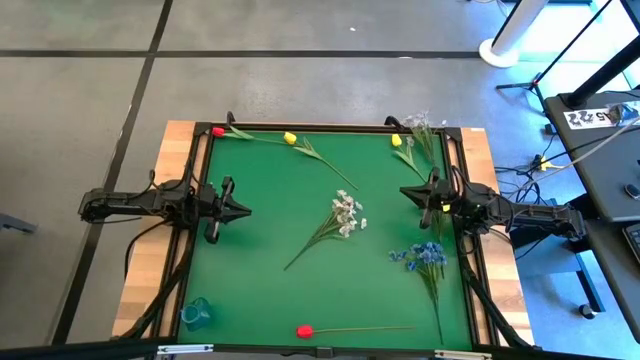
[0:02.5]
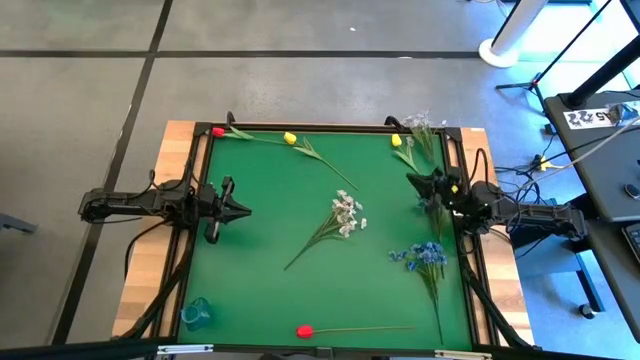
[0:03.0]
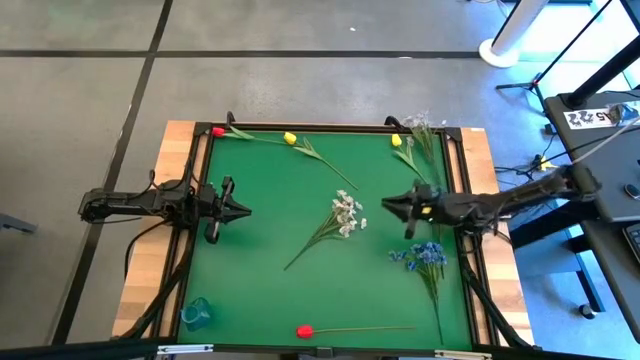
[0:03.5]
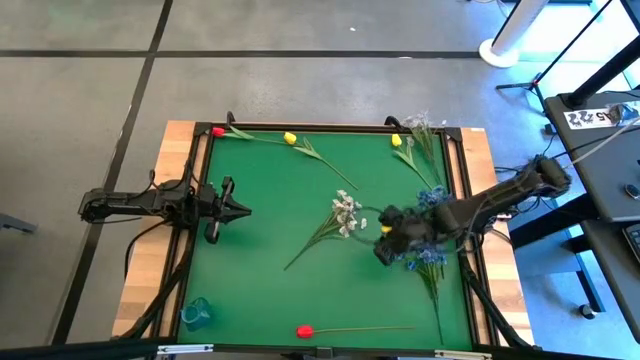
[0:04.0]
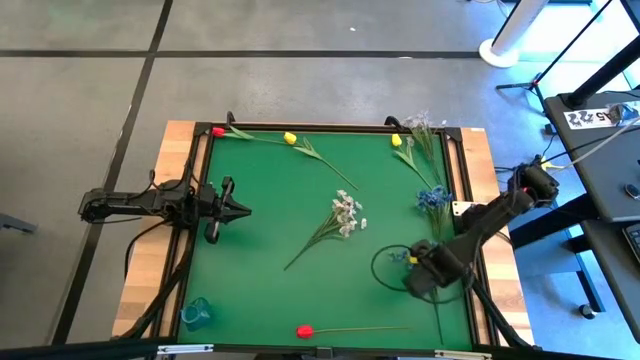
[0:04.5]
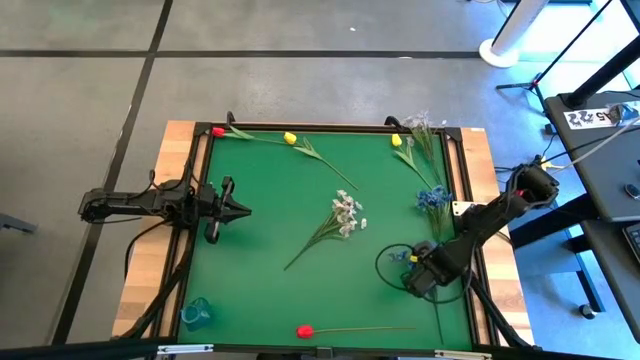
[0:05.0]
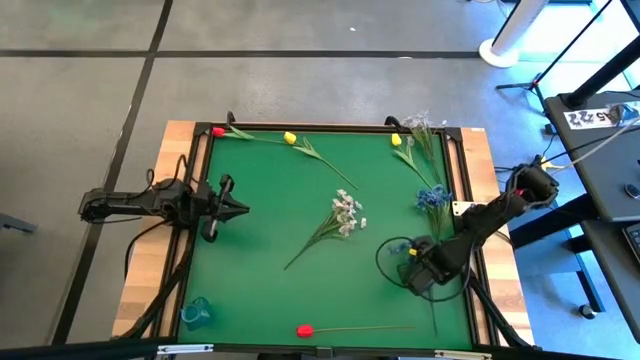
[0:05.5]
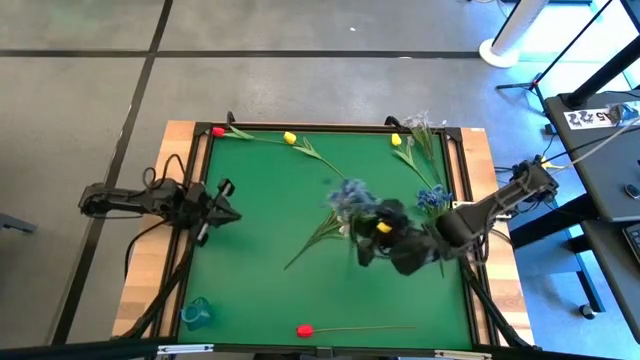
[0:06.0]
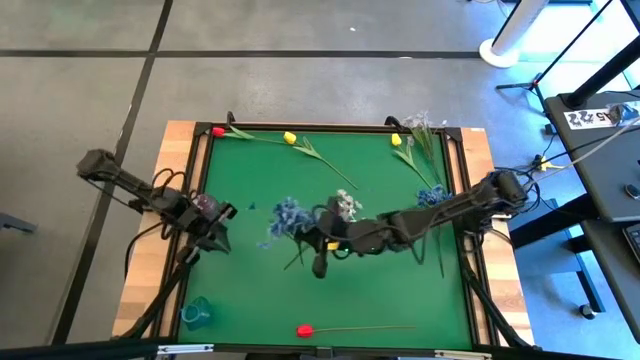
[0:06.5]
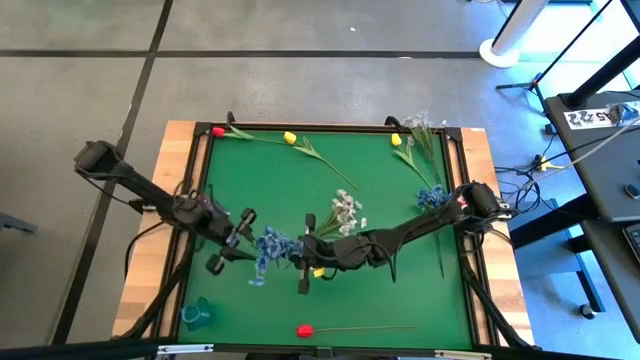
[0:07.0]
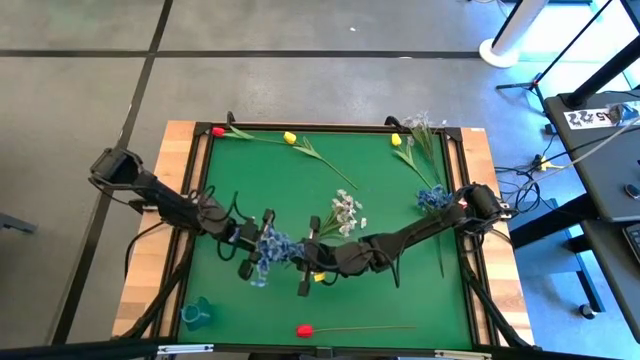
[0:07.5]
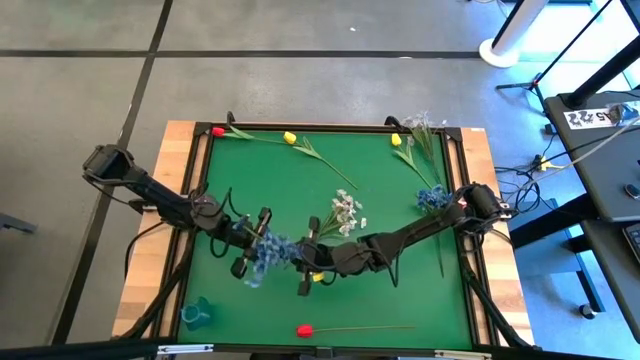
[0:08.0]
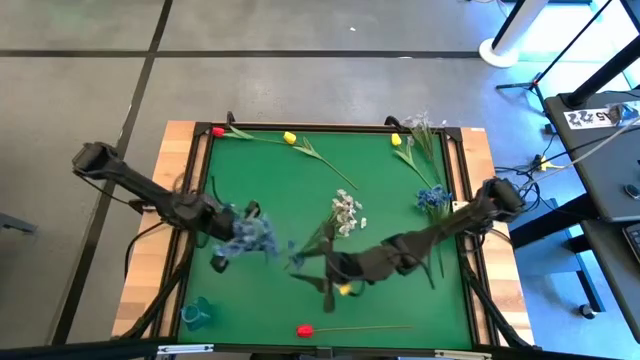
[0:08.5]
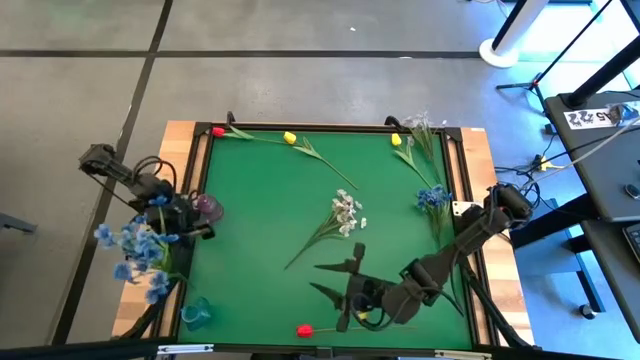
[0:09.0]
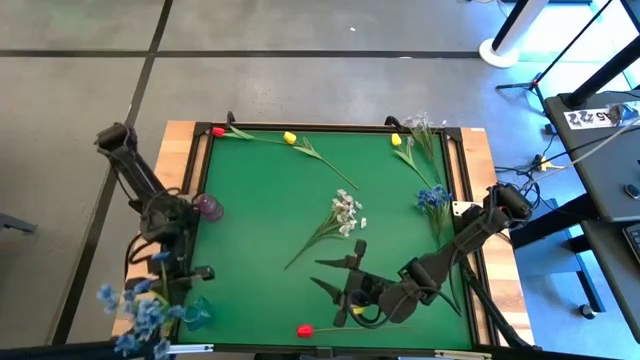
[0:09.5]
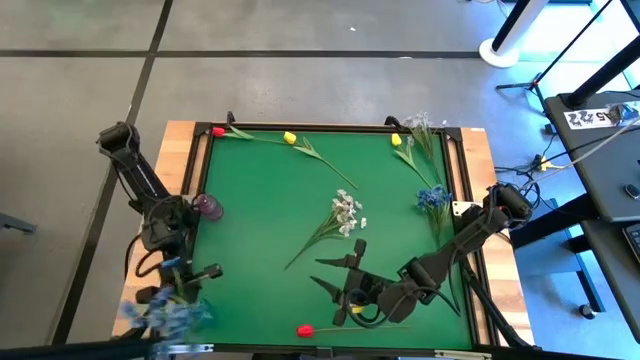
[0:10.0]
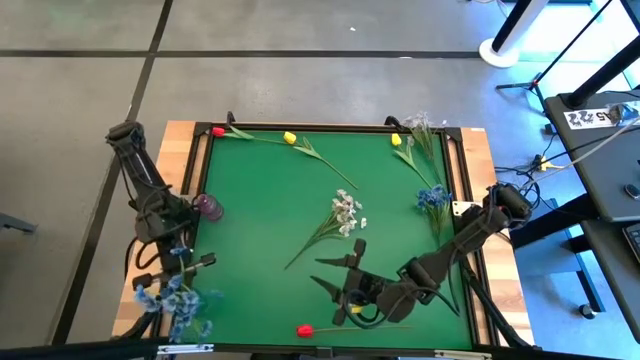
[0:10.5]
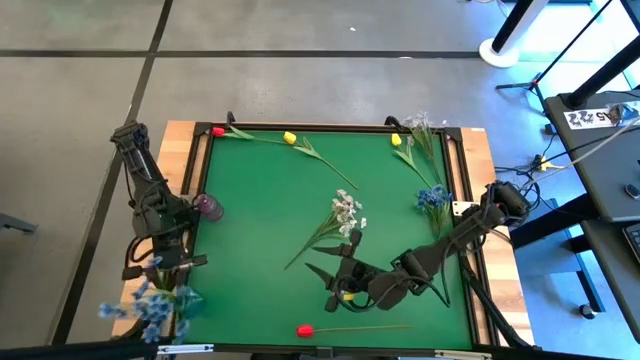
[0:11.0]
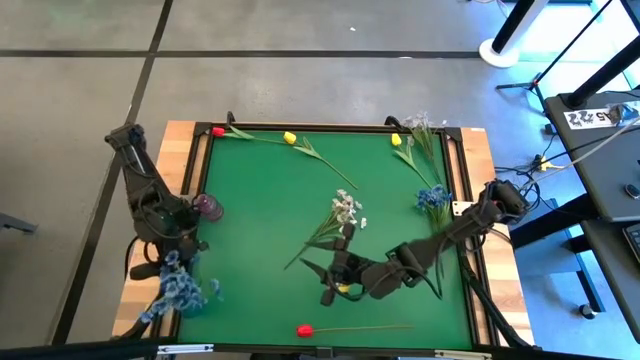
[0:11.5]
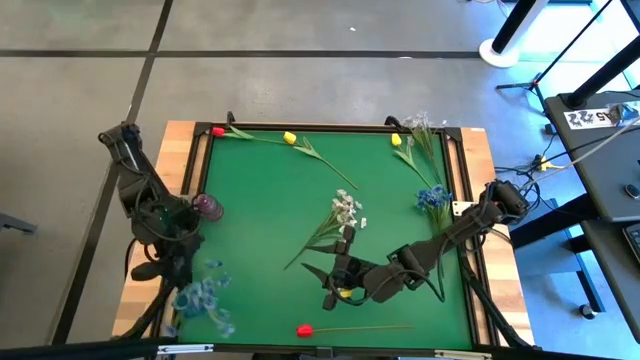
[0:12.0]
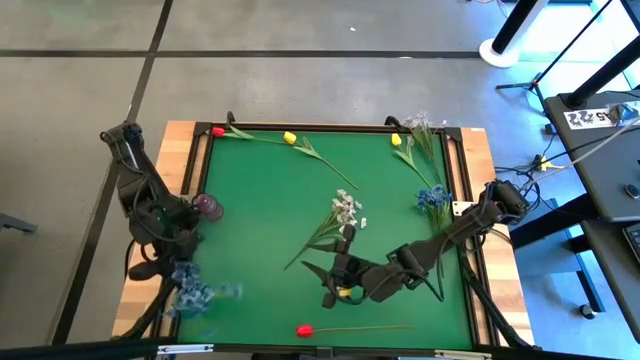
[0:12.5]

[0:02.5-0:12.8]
Task: Sort flowers into vase by color
Put the bottom blue flowers into the blue vase

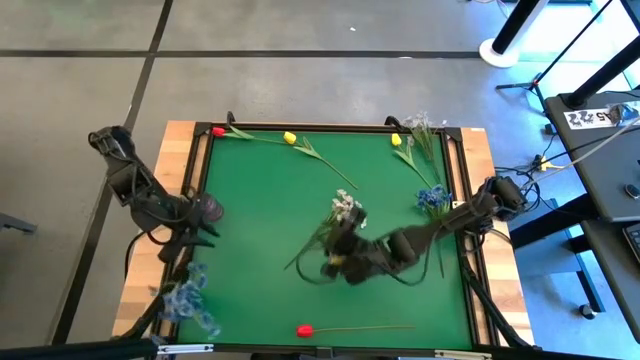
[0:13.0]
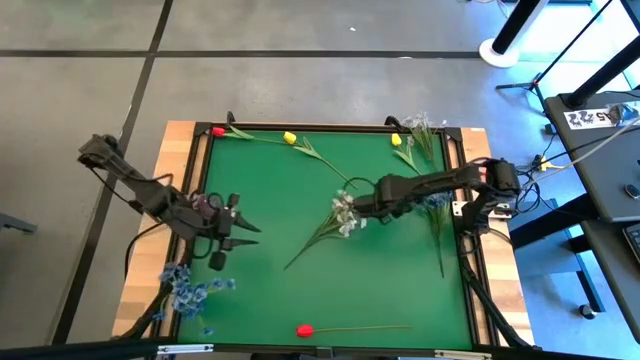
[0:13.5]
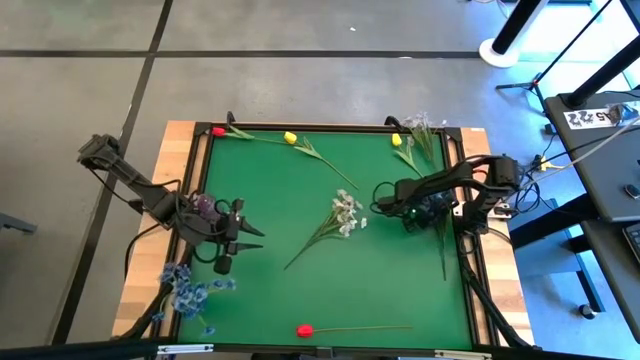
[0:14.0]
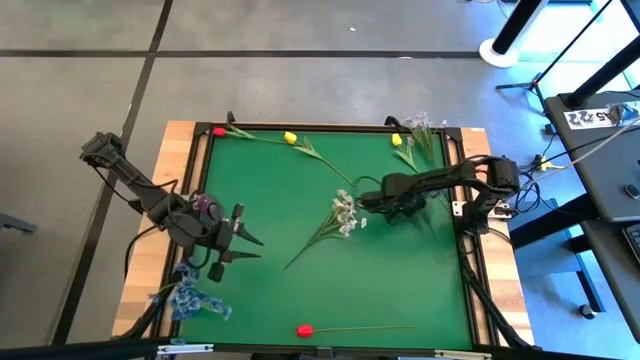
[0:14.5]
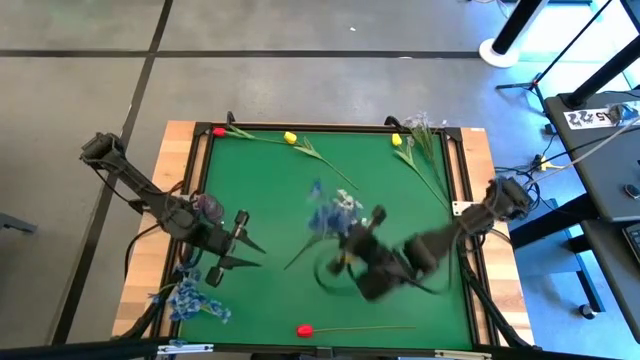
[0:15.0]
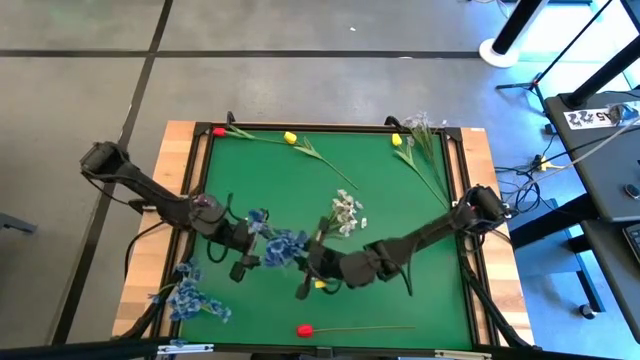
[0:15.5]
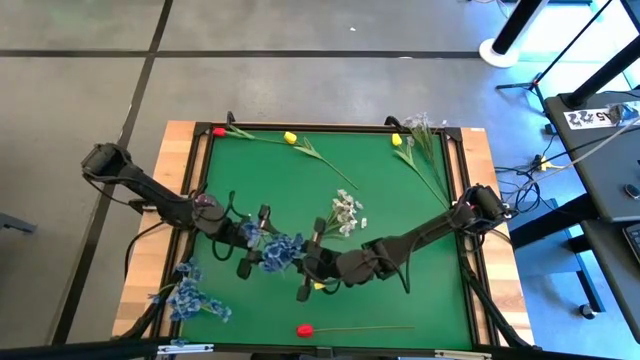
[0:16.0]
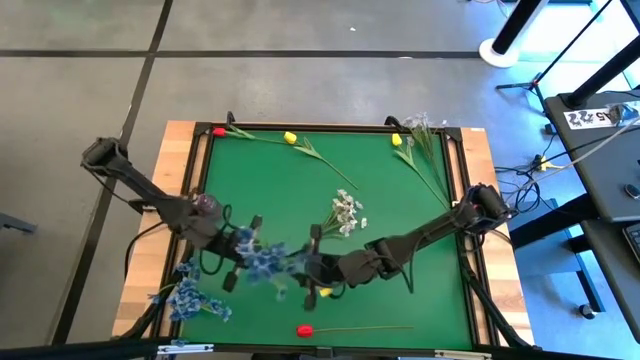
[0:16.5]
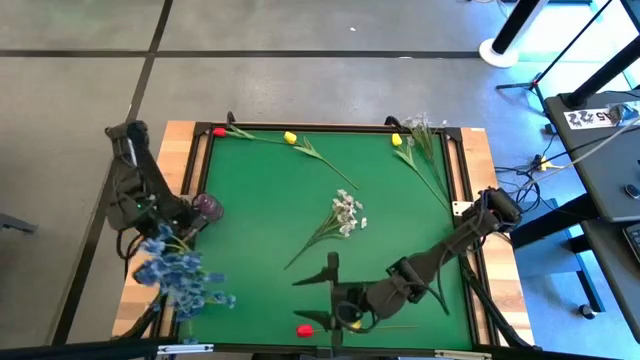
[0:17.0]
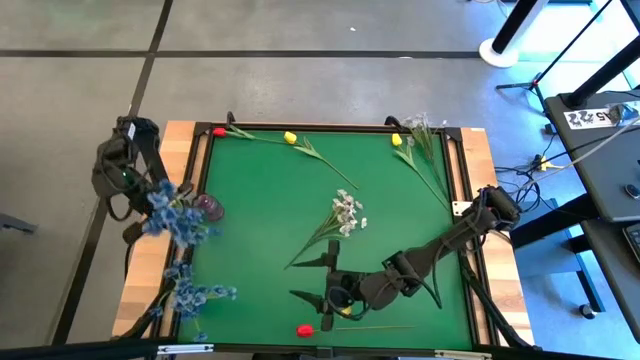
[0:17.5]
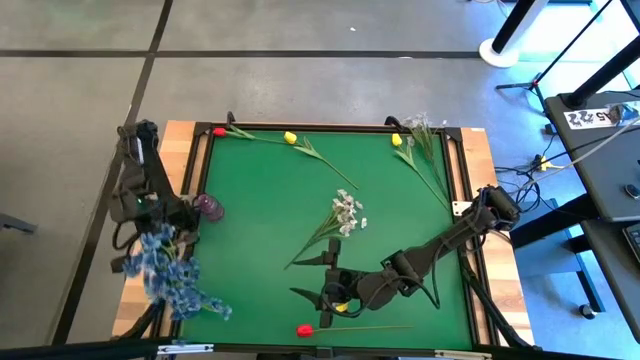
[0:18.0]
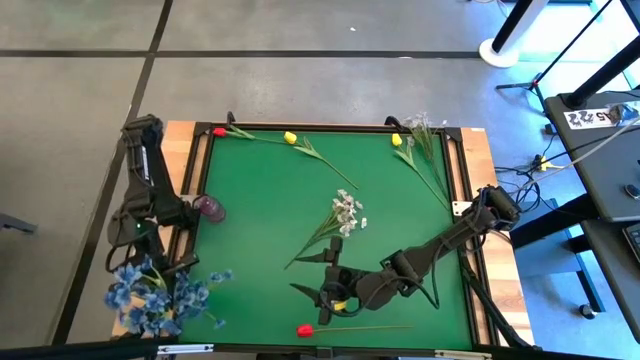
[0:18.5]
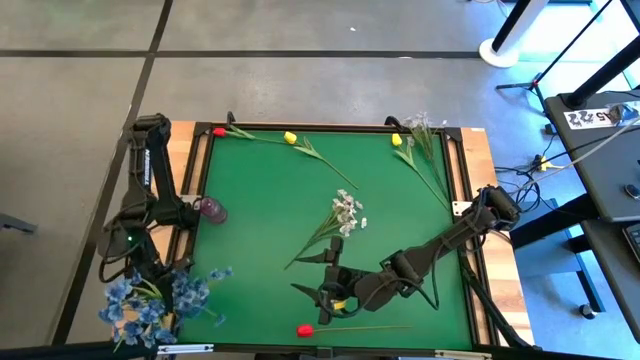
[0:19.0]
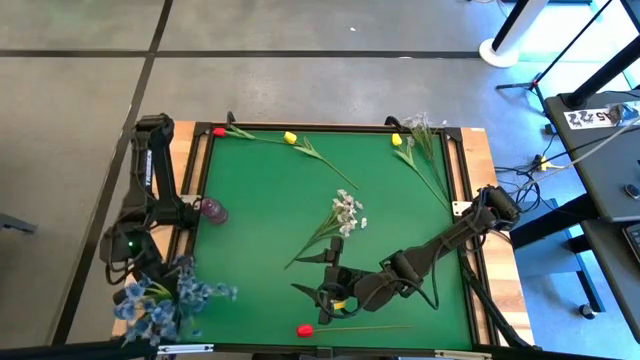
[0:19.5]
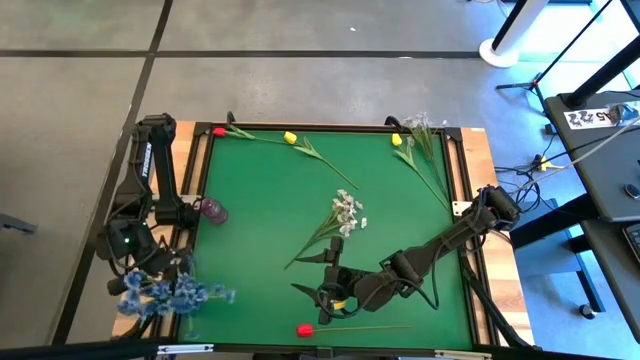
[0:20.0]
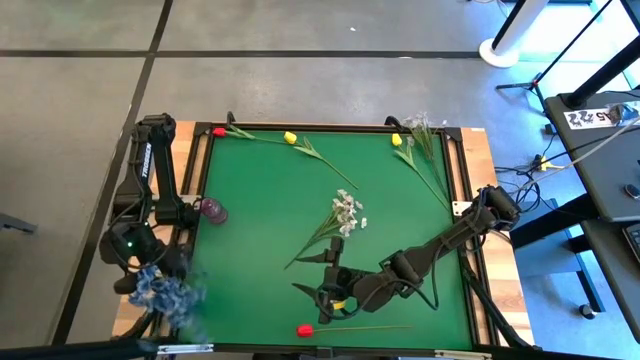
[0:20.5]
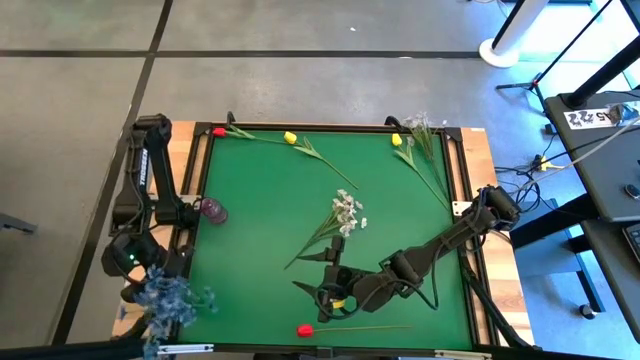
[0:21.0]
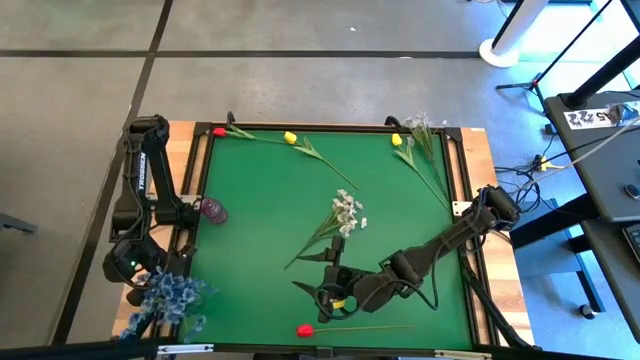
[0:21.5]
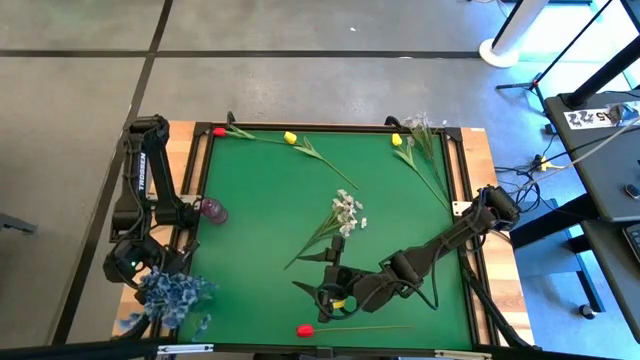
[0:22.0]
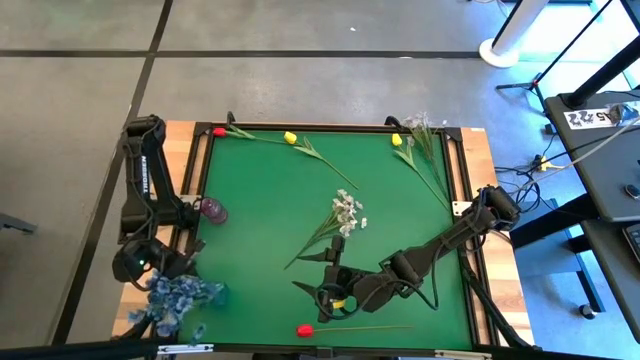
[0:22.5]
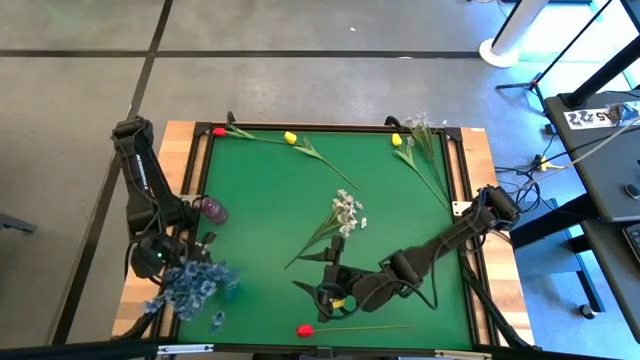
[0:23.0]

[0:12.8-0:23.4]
Put the blue flowers into the blue vase

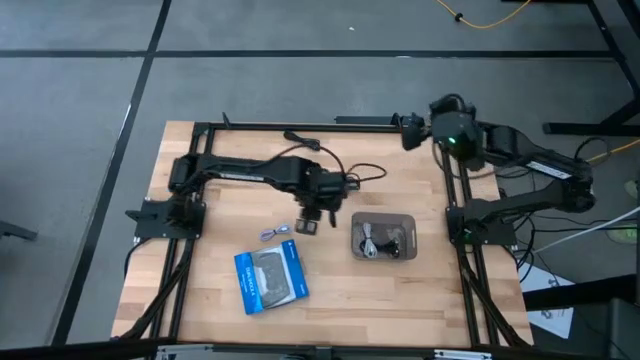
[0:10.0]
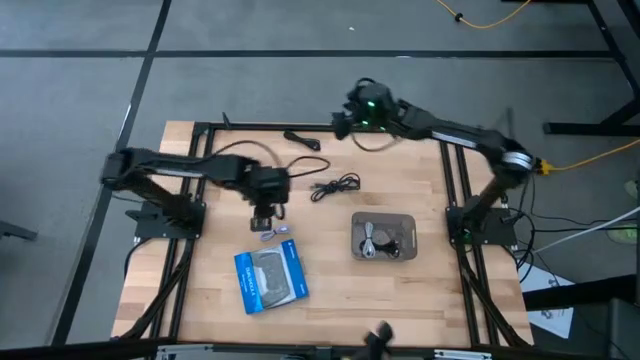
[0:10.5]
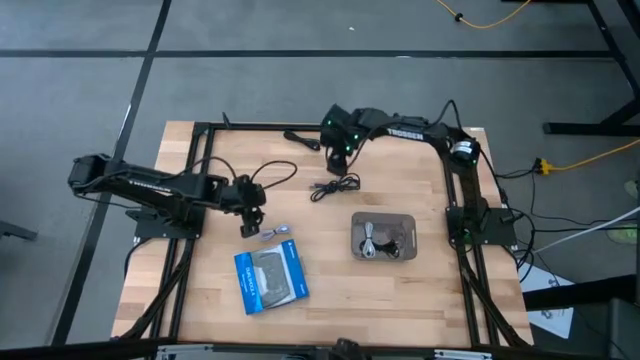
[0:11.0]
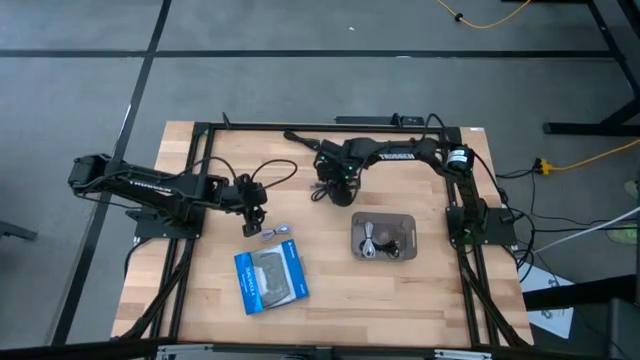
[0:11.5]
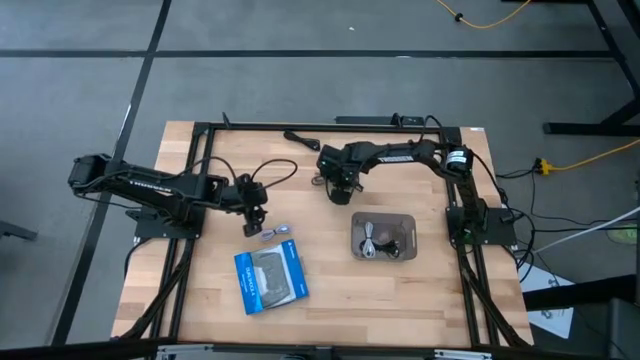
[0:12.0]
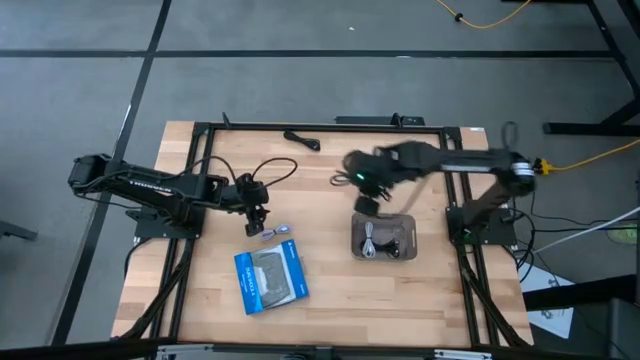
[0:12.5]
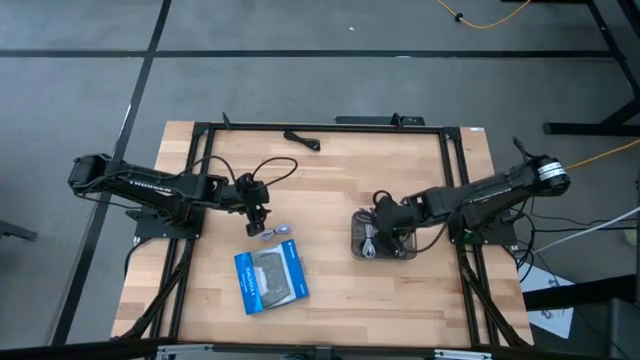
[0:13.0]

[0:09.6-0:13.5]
Task: Pick and place USB-C Cables
Put the bottom black charger cable into the black bin
